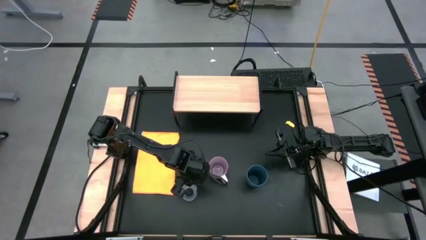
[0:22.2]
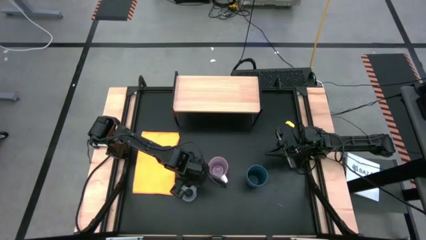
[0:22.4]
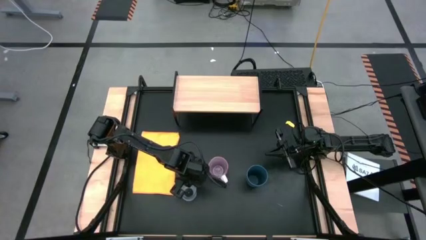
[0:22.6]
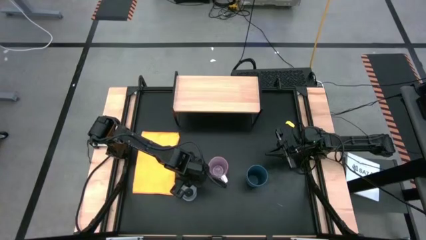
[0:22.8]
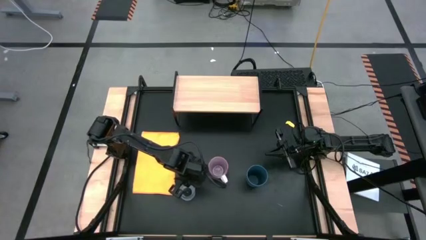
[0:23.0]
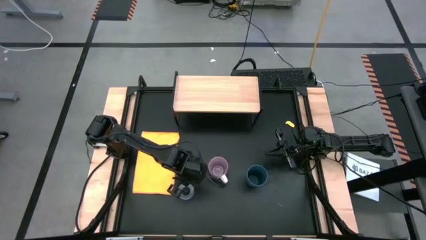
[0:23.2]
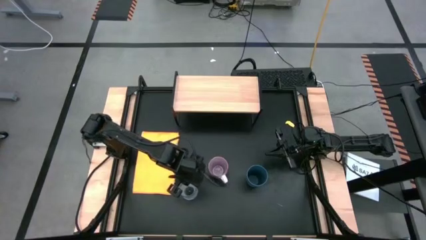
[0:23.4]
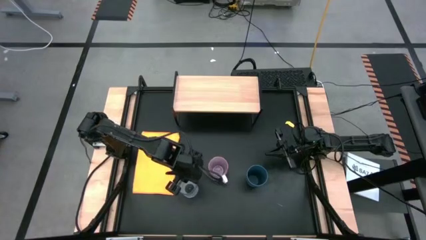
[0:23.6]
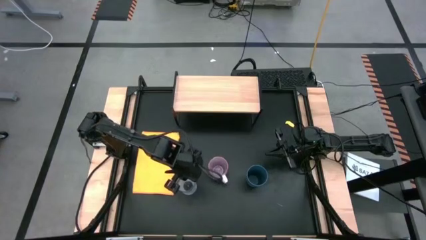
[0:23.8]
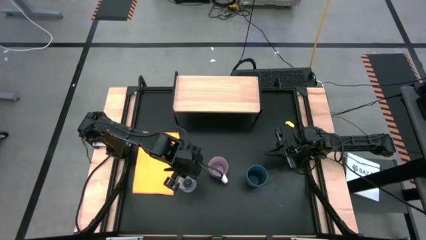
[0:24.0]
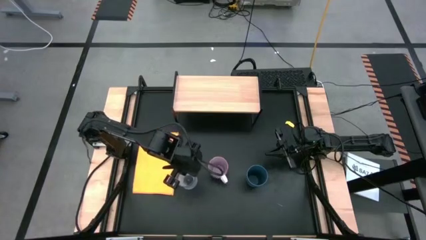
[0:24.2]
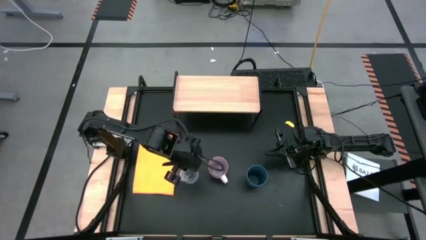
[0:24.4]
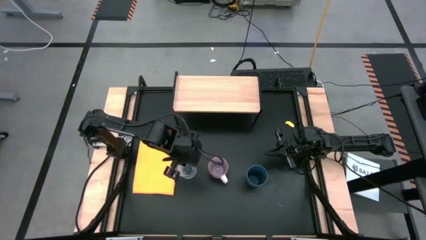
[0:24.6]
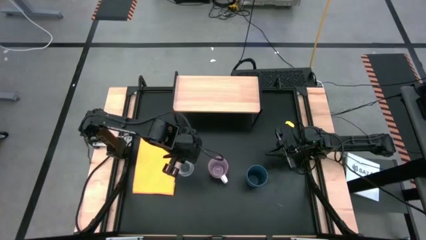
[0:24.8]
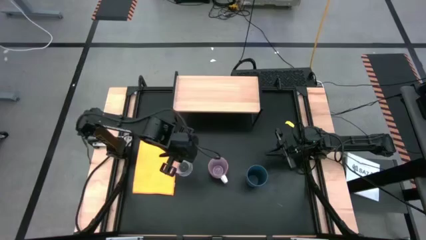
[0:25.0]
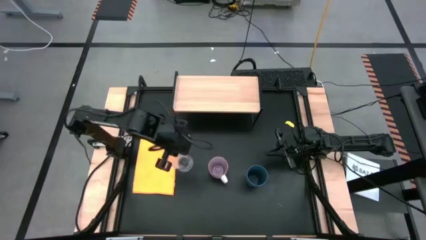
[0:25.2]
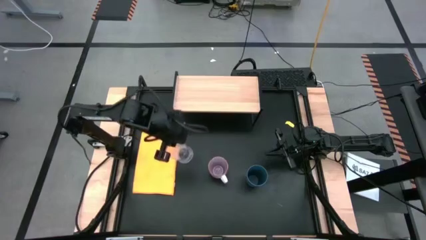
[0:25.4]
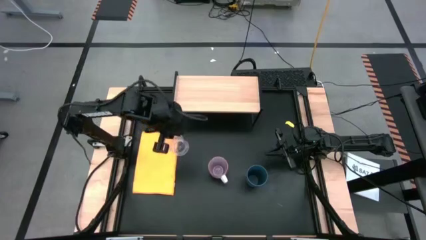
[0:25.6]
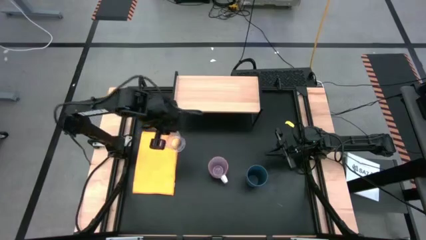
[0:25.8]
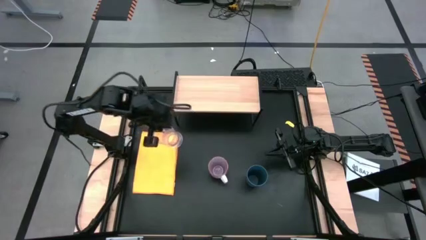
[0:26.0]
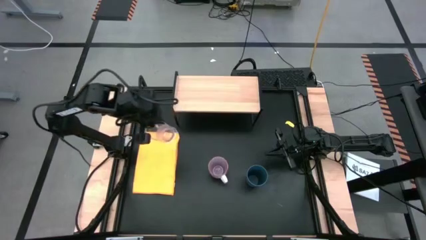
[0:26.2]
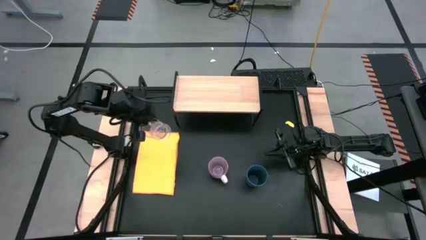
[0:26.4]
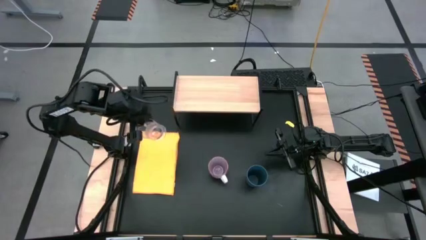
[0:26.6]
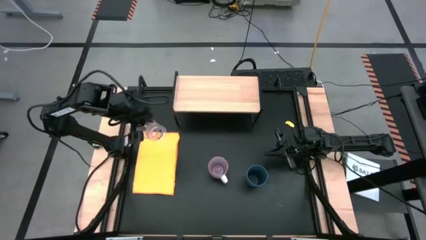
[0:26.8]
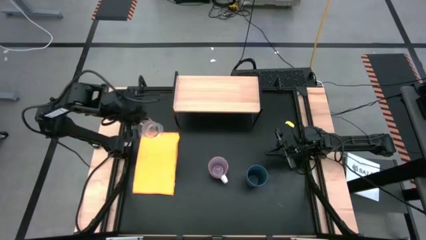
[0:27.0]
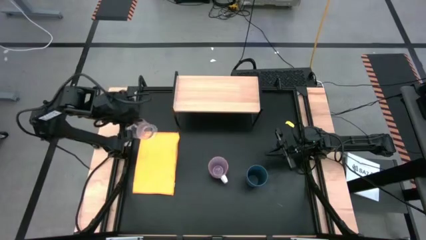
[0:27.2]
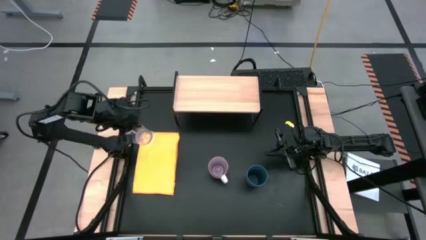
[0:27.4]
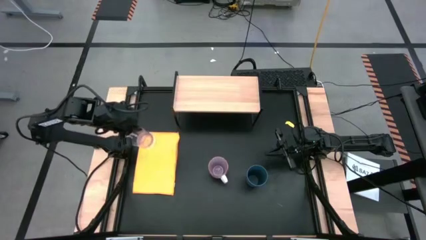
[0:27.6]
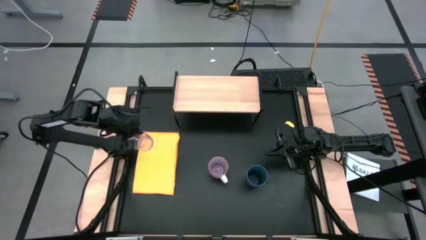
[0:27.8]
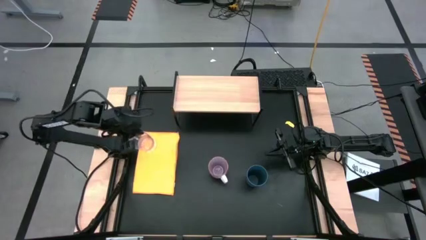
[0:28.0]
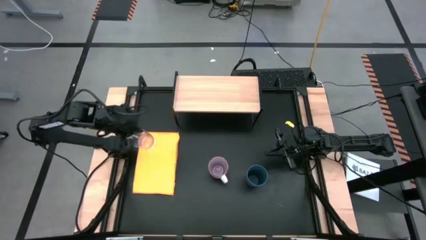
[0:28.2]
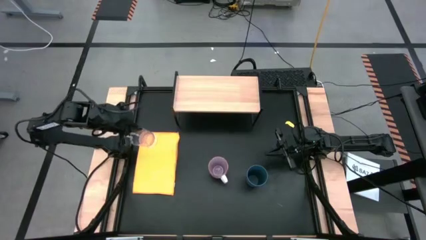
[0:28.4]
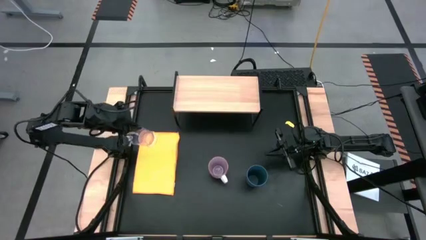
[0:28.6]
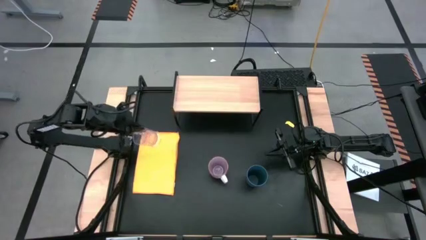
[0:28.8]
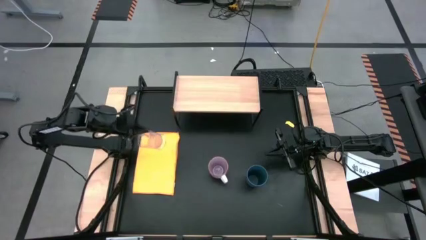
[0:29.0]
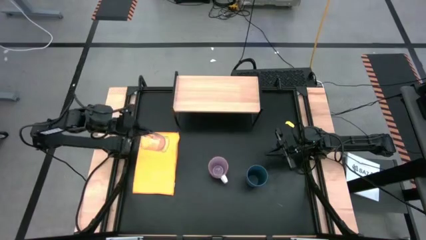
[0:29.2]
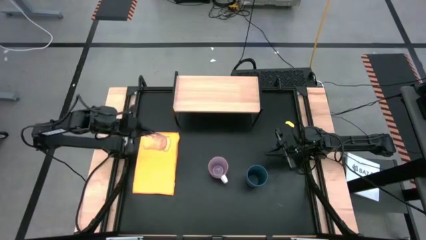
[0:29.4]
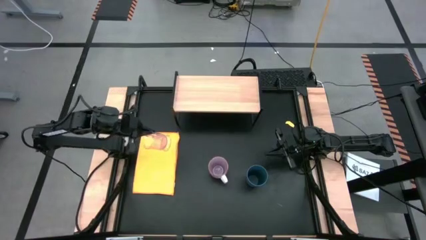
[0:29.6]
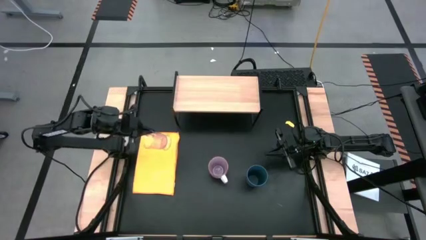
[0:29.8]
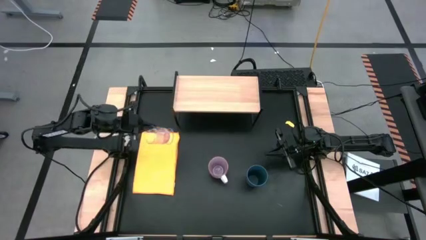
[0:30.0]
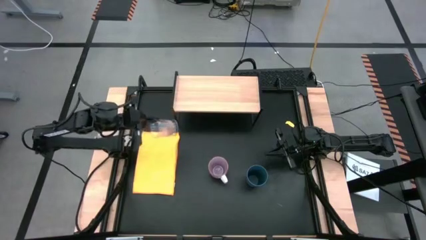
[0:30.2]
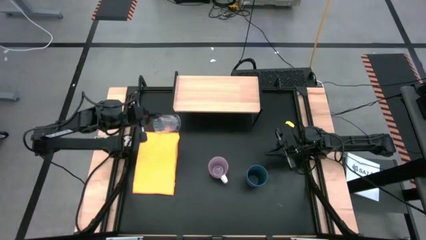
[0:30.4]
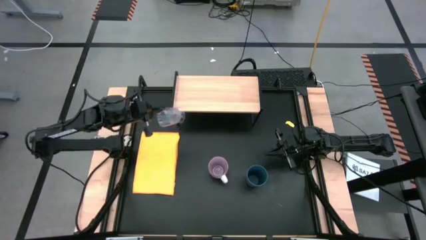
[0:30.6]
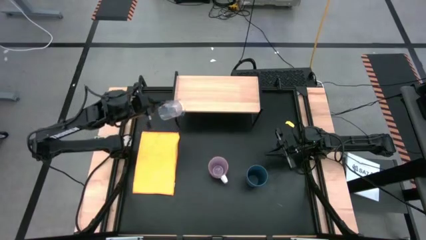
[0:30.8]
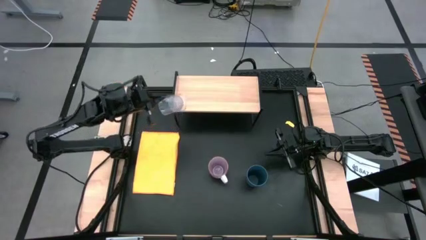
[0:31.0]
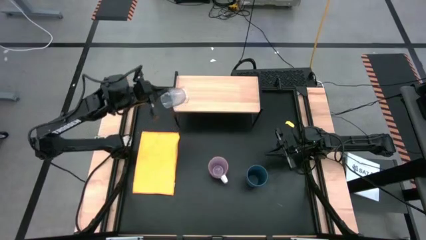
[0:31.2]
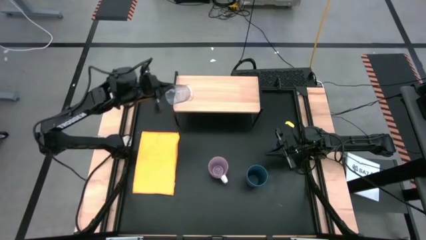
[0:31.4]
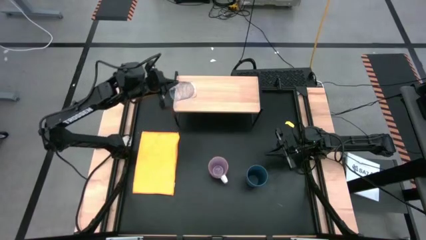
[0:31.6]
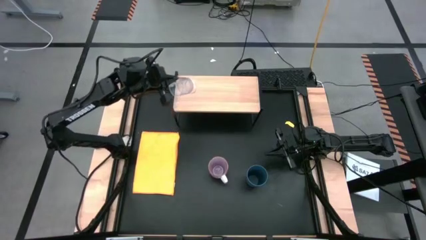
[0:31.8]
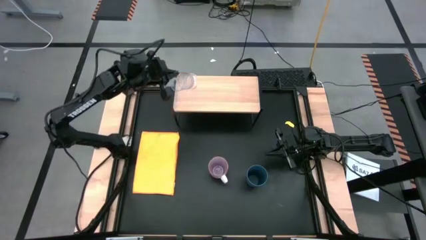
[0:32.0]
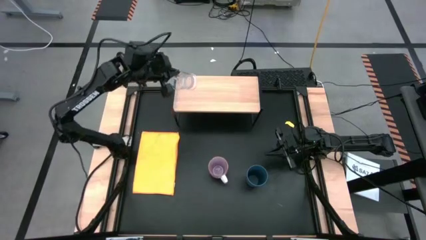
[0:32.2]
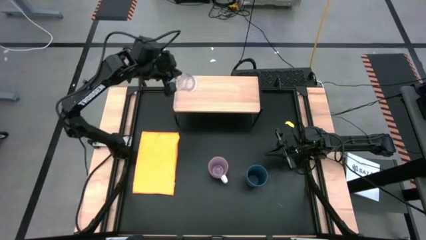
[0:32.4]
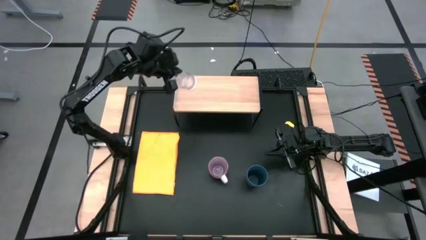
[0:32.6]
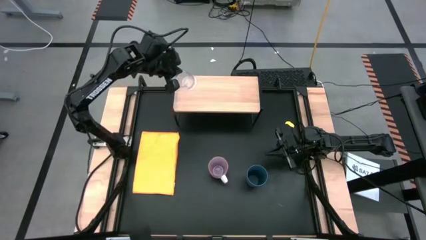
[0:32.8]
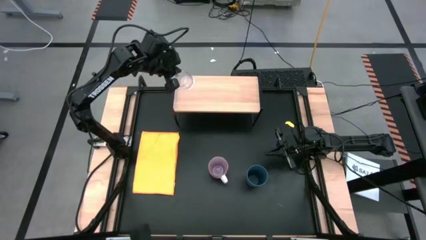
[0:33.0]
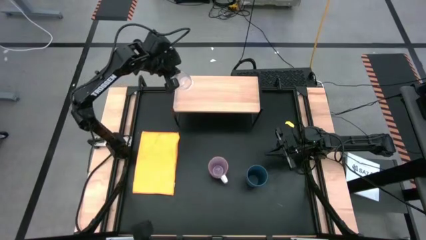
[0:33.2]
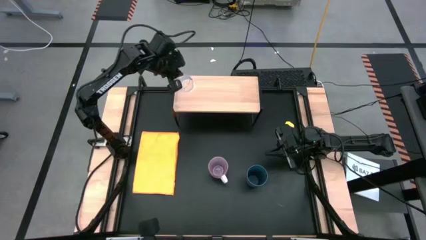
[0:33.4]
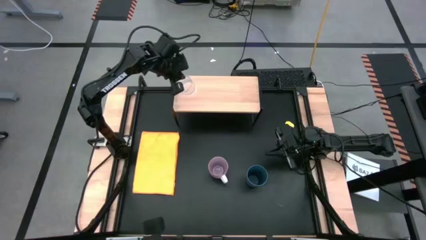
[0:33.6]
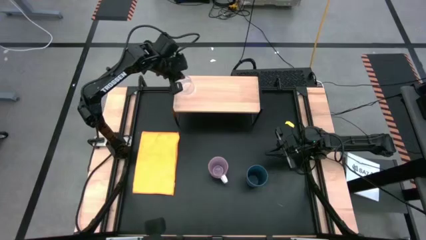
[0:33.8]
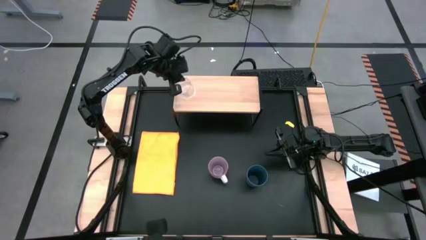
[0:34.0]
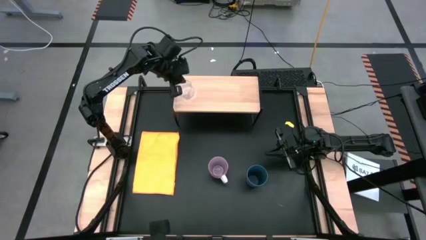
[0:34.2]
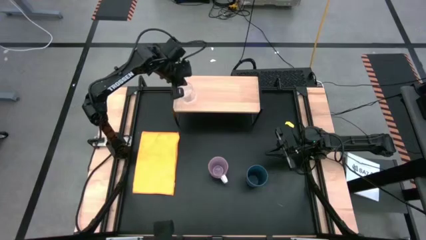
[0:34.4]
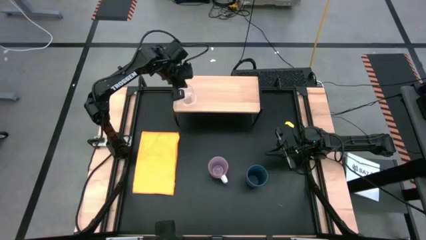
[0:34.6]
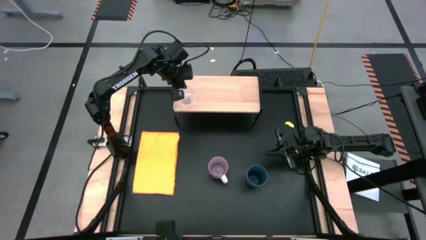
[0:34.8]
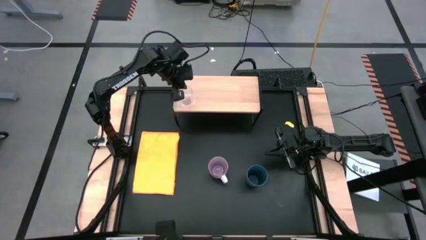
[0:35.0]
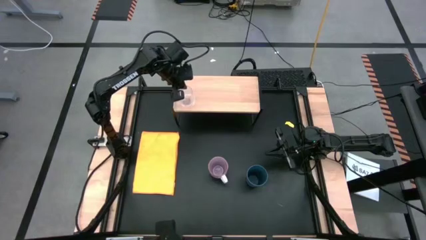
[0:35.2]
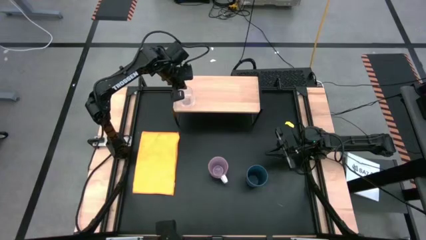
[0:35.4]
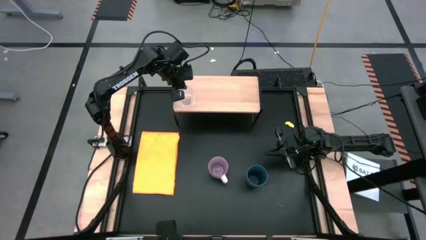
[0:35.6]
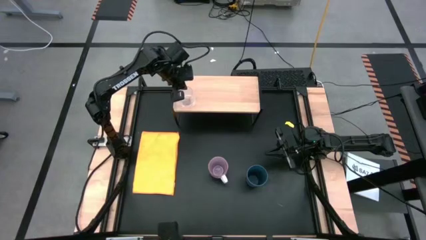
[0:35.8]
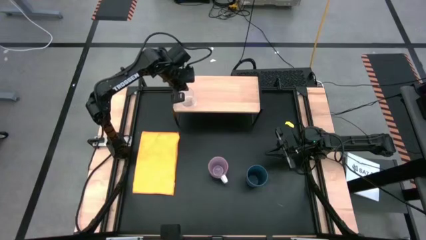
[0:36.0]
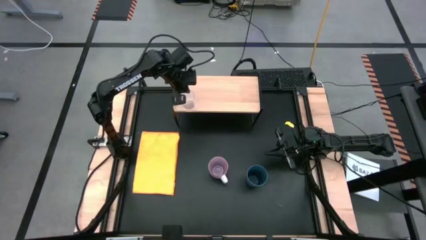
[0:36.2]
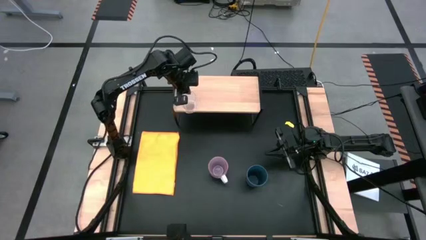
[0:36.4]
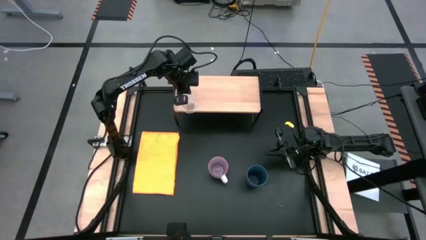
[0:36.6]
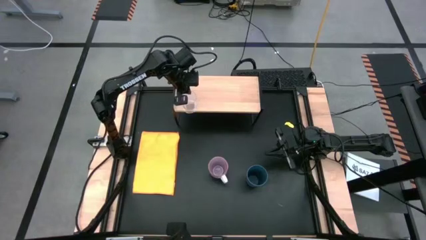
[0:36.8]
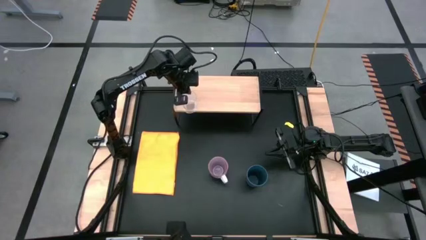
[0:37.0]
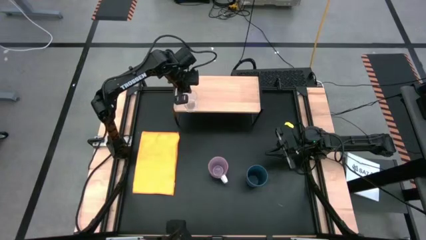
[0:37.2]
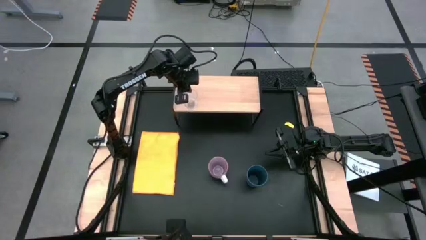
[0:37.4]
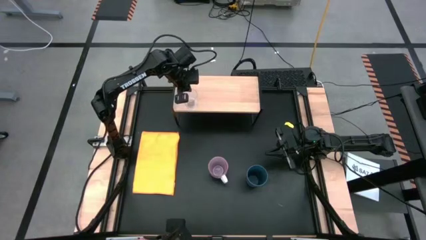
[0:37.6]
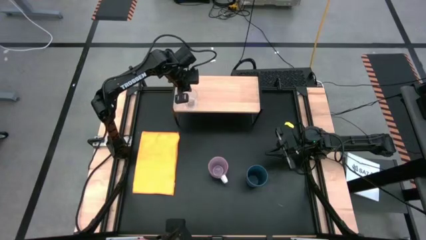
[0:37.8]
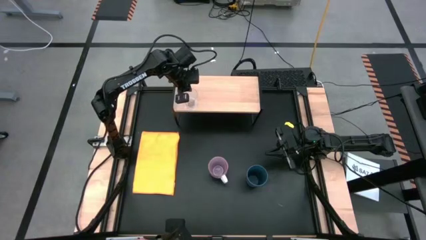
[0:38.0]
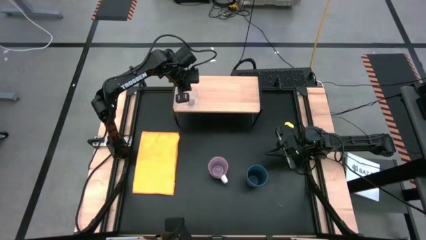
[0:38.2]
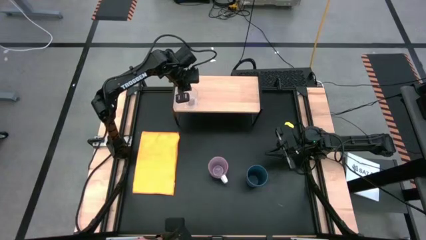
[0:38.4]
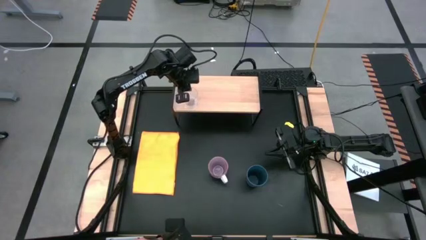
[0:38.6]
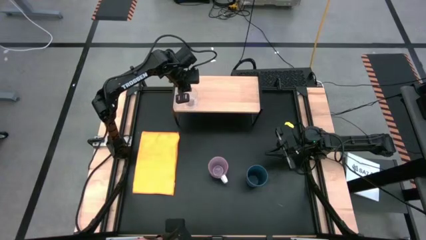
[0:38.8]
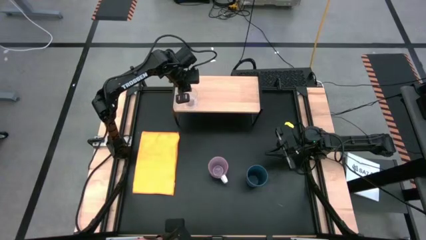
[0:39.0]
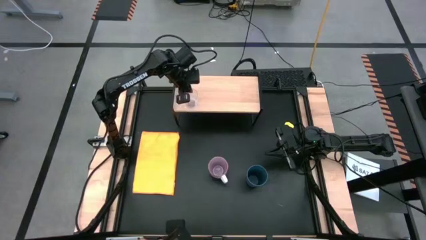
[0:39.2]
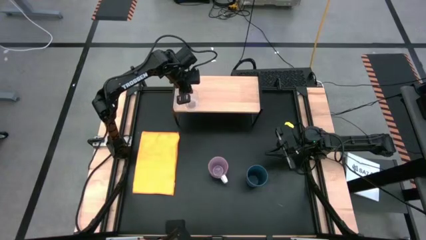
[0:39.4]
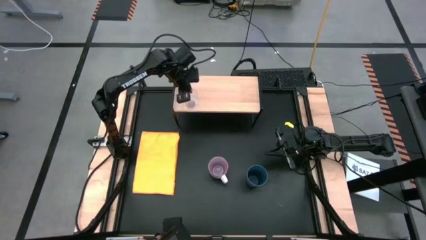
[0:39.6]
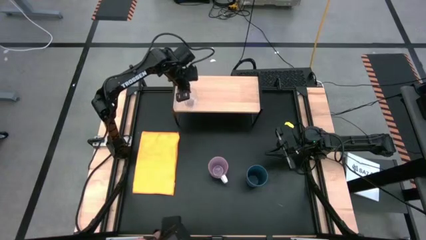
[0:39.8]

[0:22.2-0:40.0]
Task: Stack small to large cups/mugs on shelf
Put the transparent mug on the shelf
